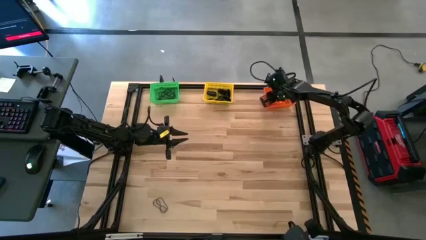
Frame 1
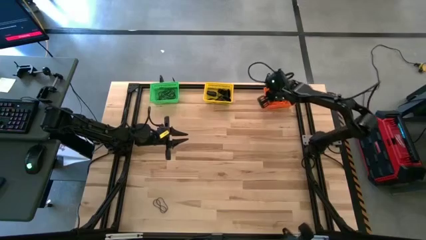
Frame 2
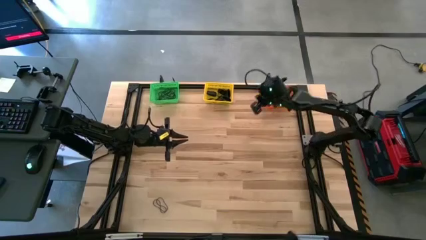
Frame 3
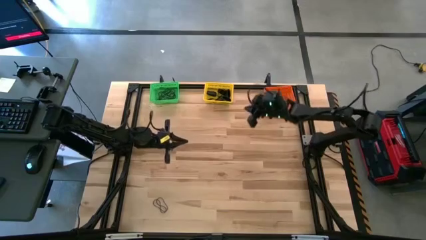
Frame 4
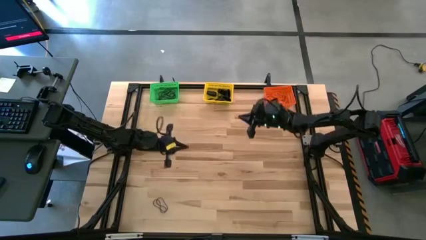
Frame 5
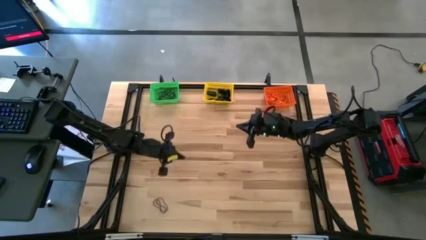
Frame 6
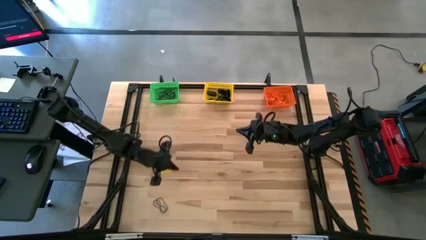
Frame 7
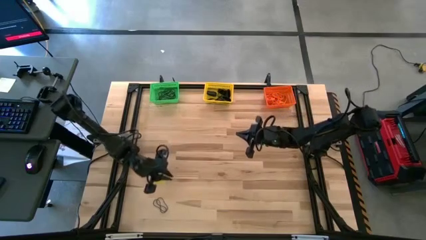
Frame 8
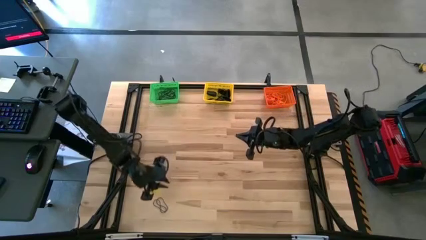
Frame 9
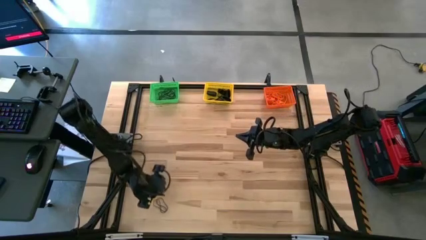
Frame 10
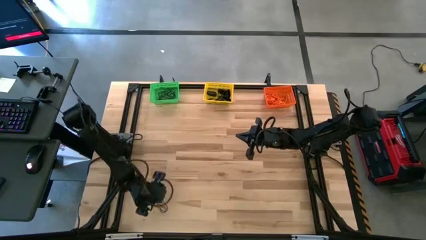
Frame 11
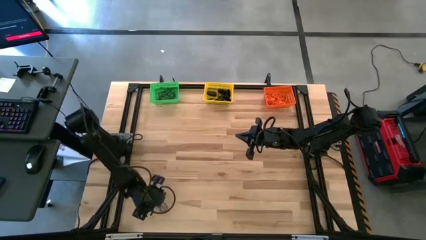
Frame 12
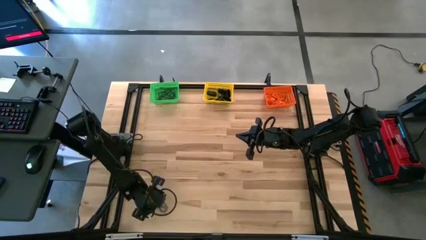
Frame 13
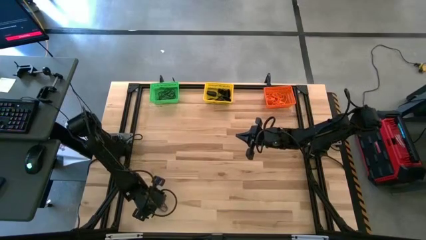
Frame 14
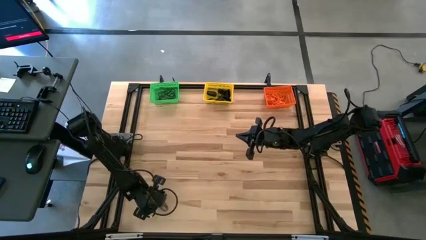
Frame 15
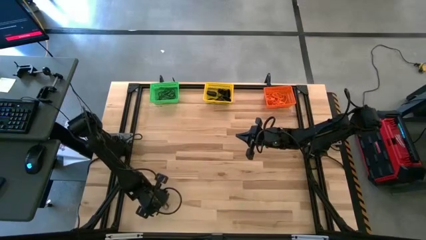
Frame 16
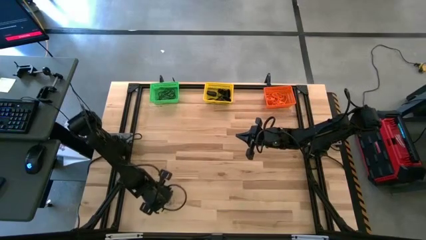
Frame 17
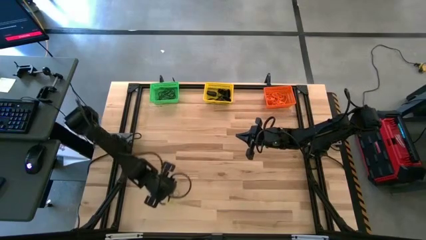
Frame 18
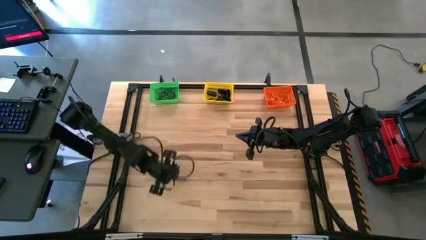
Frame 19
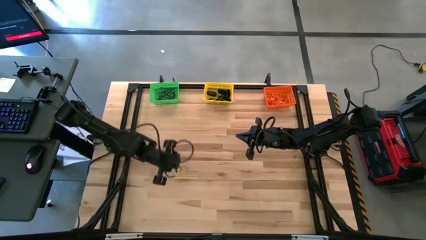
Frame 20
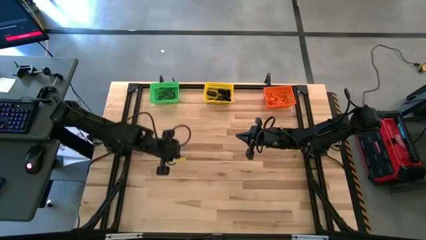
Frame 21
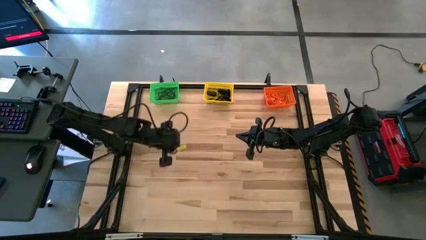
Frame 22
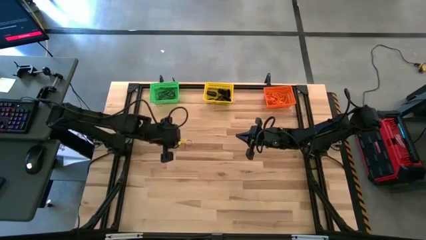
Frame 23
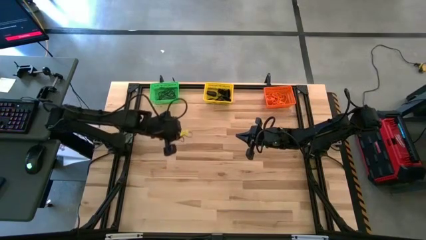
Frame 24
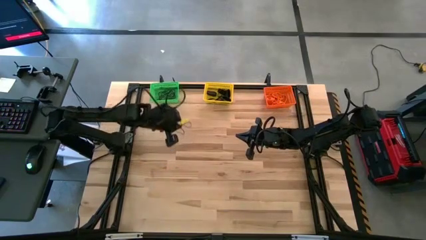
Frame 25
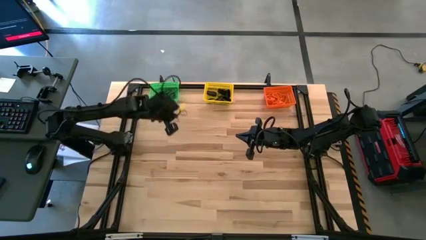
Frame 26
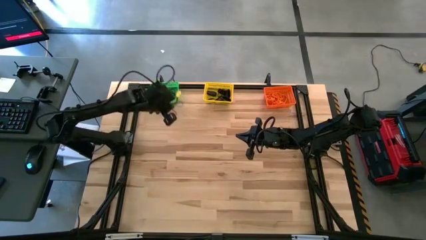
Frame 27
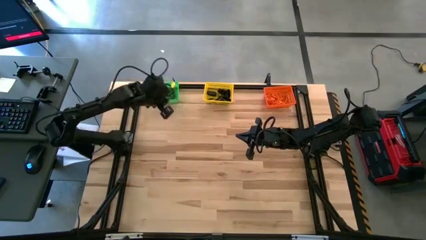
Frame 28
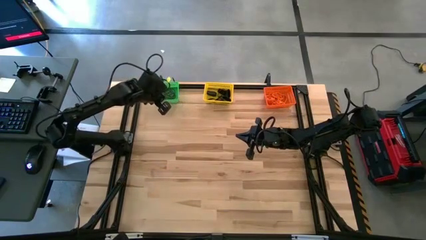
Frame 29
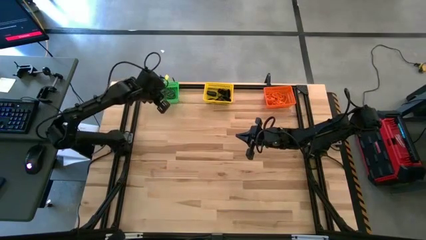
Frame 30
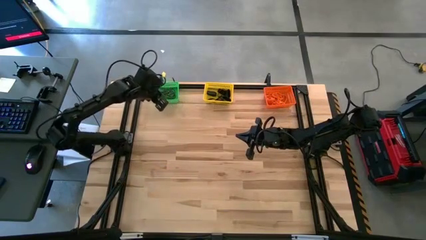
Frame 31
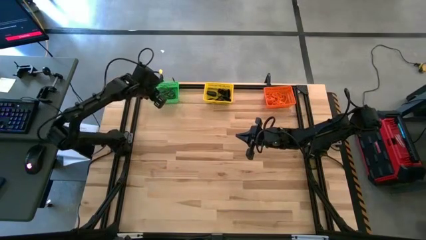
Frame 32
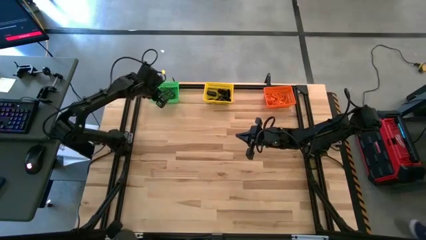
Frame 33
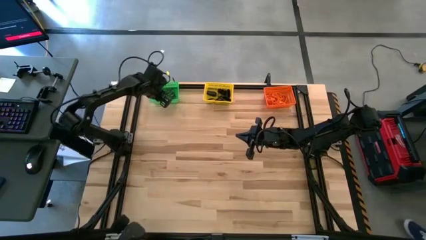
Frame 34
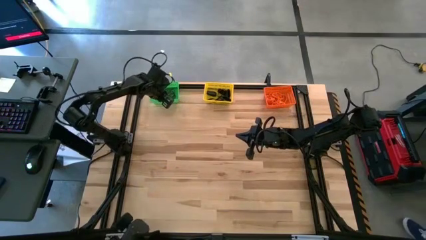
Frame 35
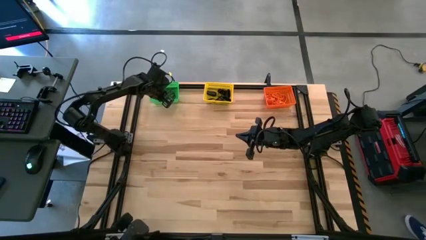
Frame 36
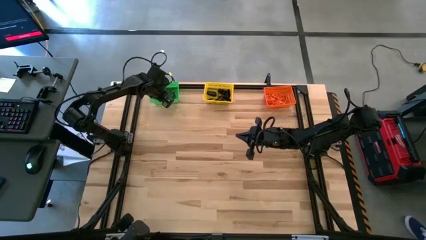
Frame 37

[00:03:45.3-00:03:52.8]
Task: Sort rubber bands into baskets
Put the purple rubber band into the green bin

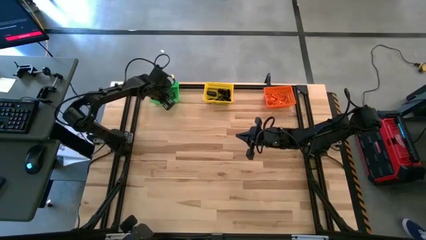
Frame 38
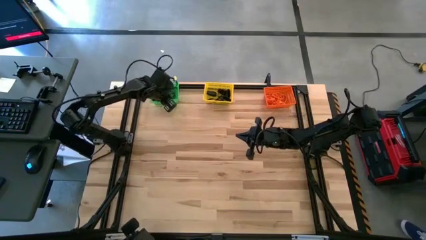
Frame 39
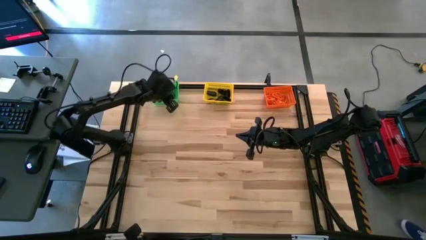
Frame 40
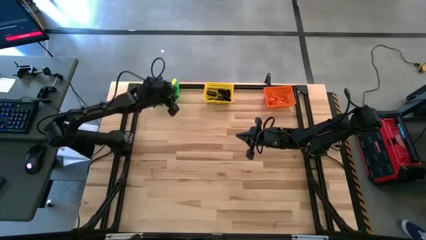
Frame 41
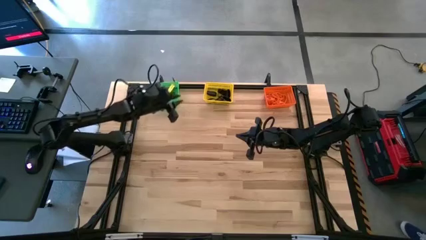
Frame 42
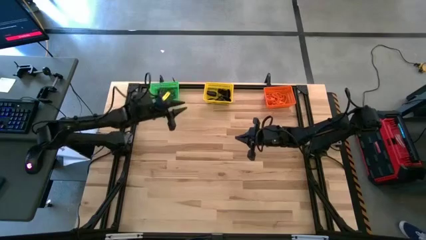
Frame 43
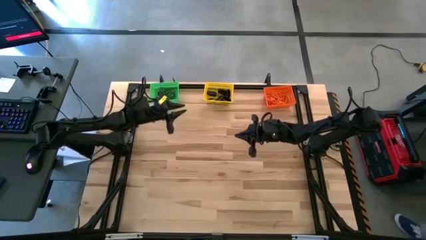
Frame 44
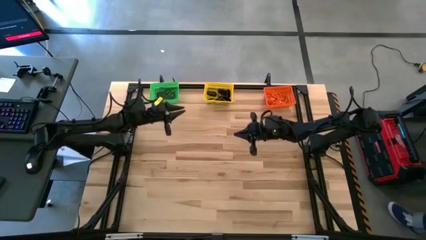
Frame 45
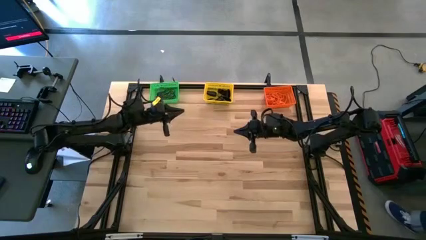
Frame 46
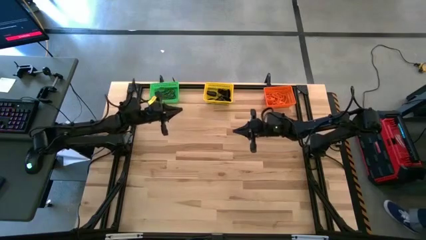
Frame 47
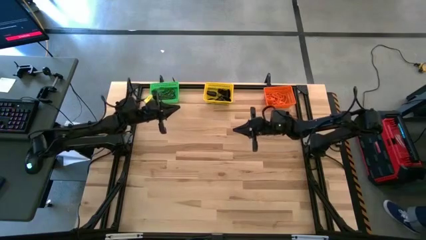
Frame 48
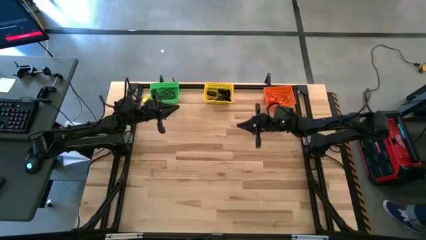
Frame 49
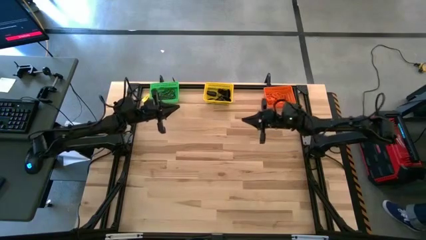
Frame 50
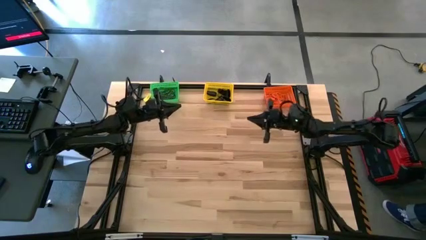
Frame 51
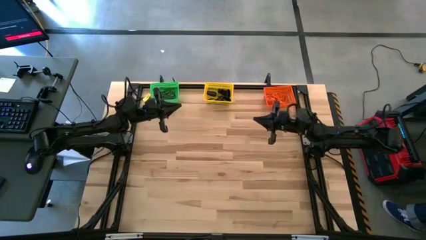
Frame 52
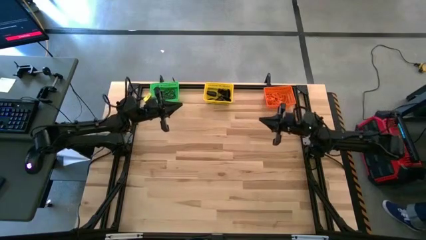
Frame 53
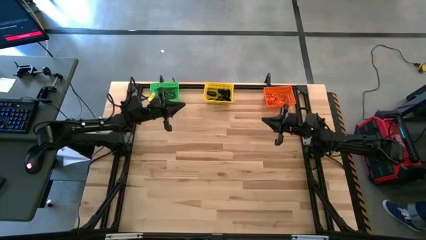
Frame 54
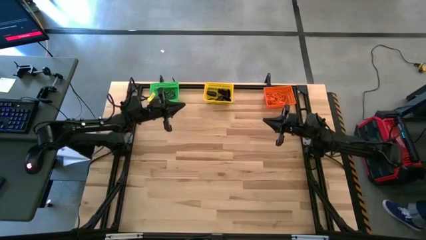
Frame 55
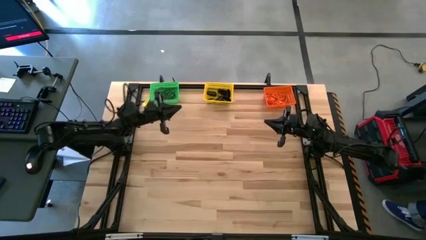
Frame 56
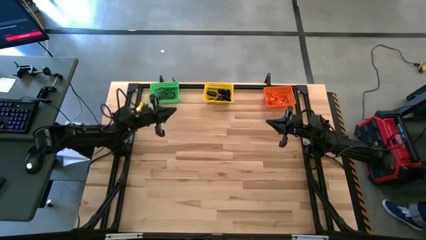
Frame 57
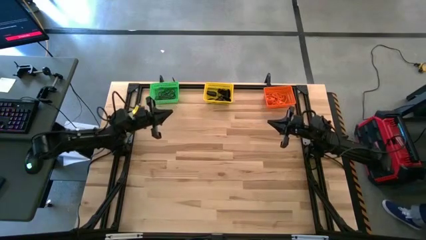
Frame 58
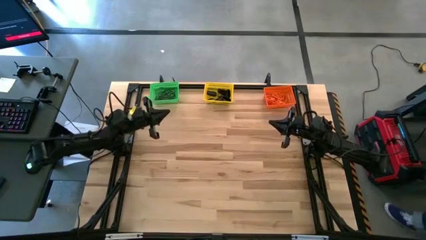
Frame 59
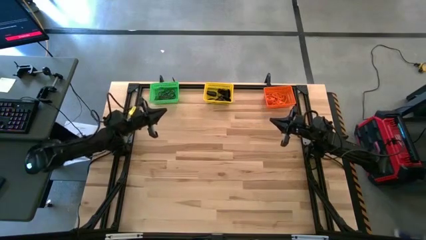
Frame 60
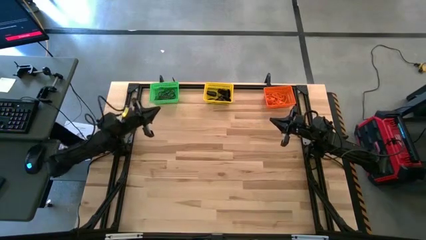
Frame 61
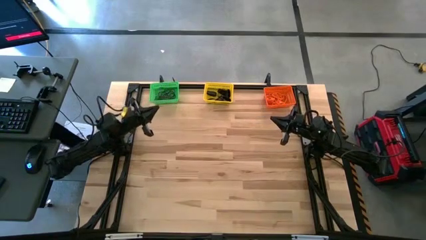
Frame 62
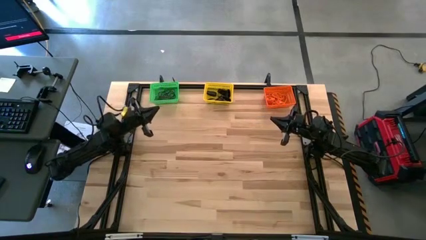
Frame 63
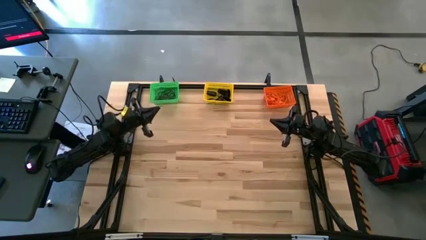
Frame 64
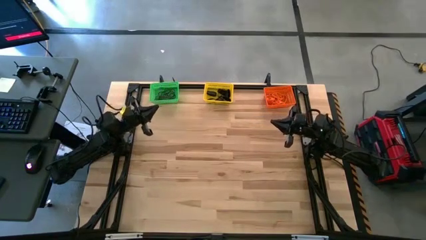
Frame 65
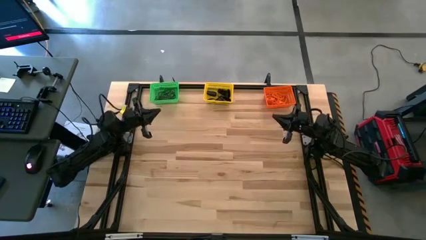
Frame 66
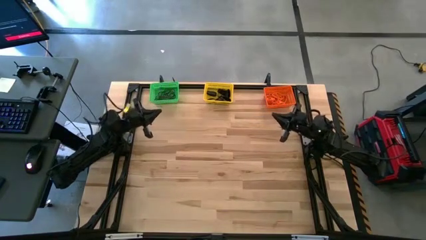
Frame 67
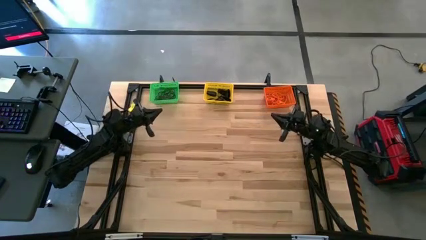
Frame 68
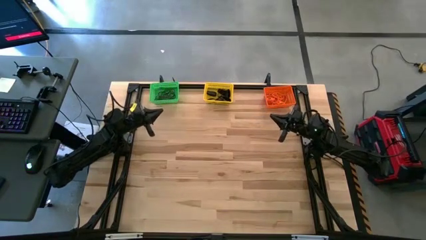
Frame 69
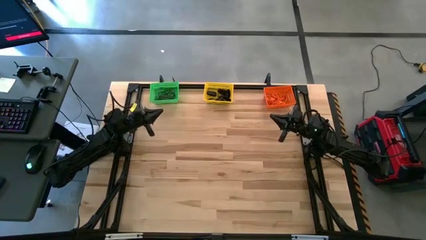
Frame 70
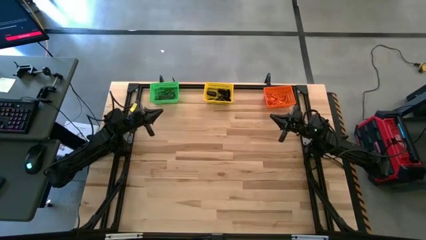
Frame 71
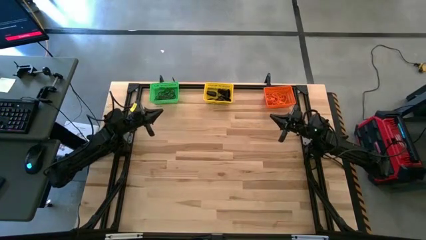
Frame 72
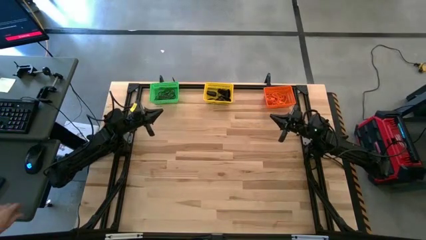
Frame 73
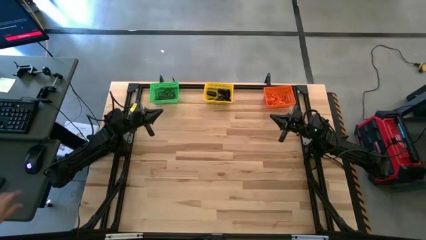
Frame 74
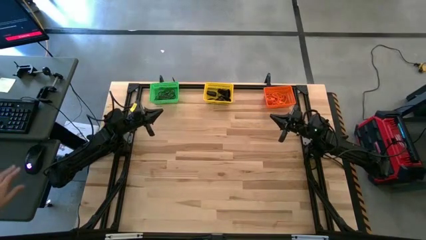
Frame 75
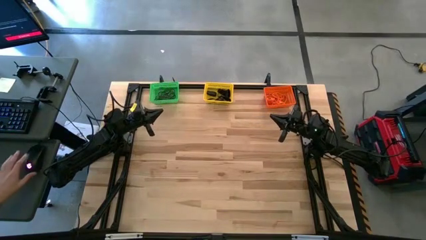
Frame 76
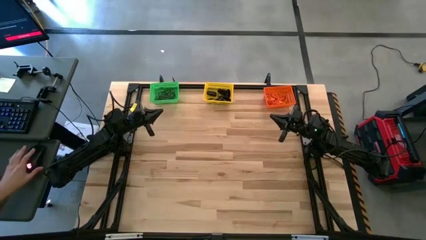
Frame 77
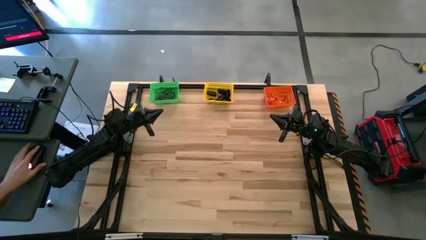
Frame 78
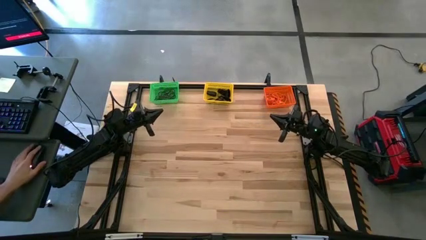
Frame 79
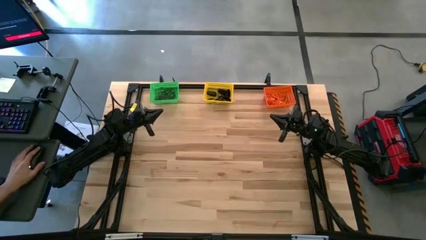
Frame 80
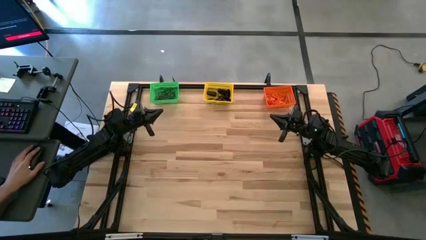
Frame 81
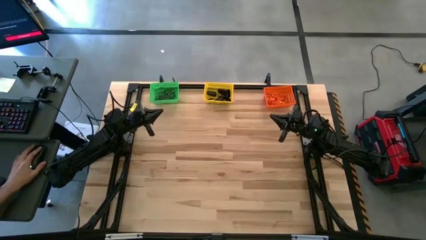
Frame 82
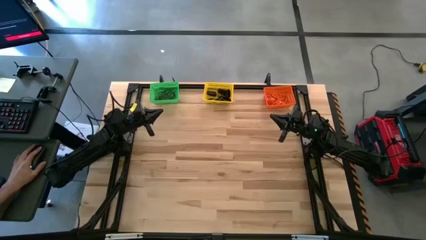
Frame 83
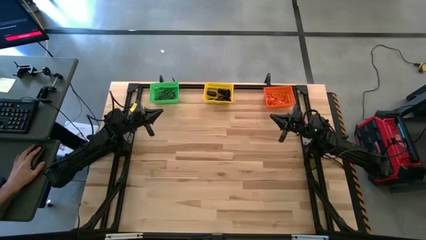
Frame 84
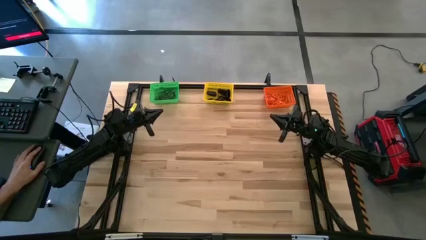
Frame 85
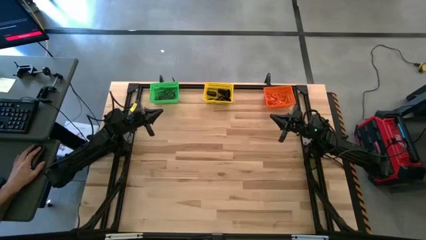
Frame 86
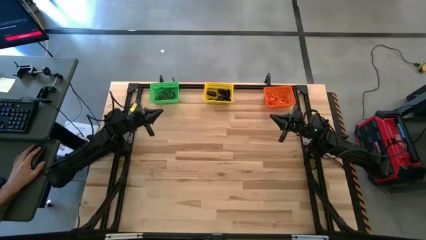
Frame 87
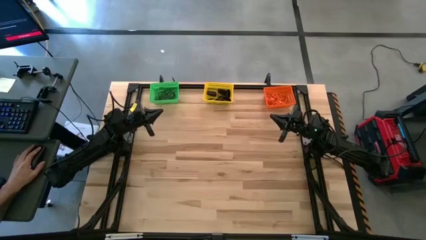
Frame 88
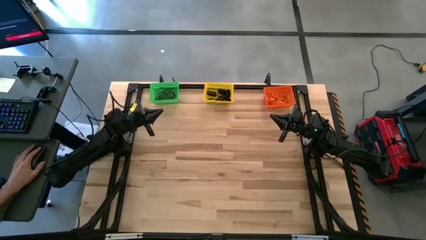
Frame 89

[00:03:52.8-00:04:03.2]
Return to Home Position
